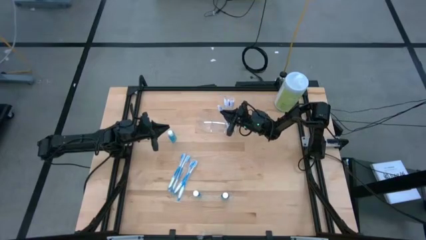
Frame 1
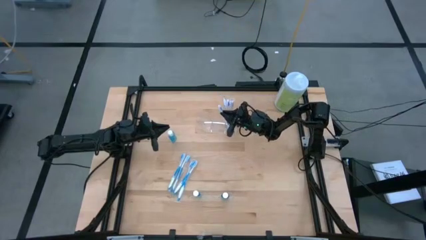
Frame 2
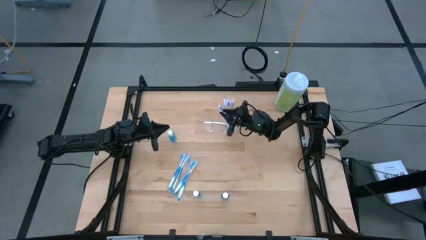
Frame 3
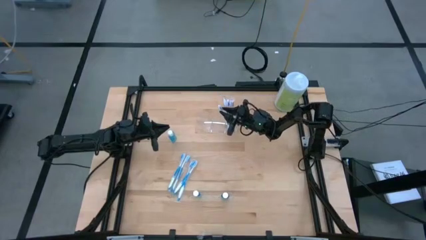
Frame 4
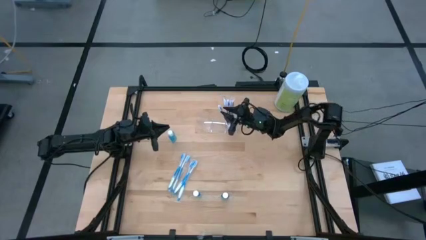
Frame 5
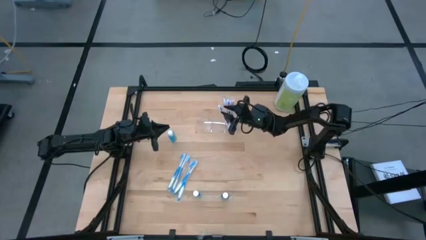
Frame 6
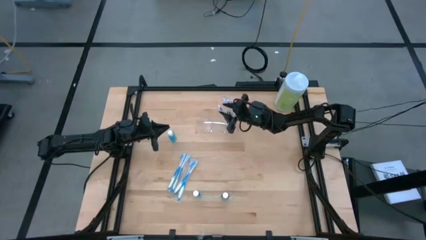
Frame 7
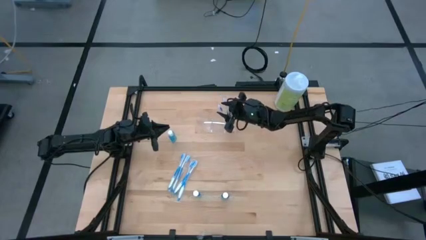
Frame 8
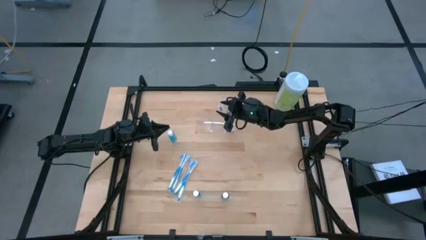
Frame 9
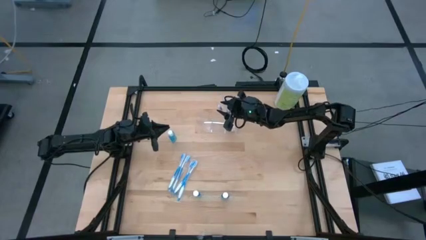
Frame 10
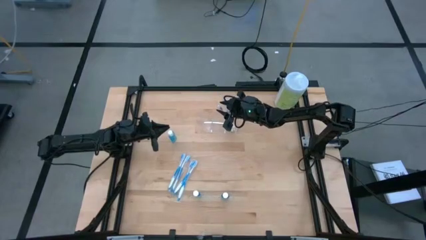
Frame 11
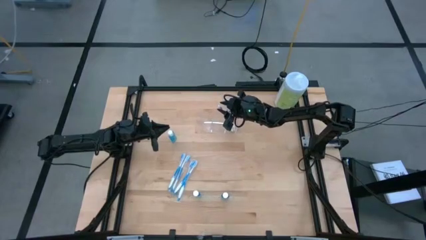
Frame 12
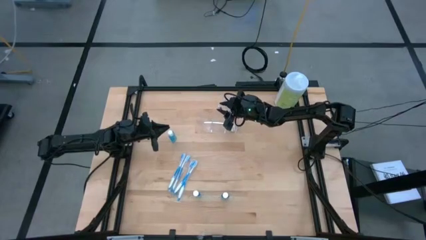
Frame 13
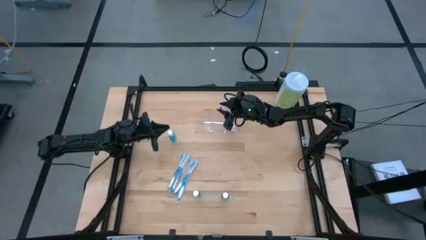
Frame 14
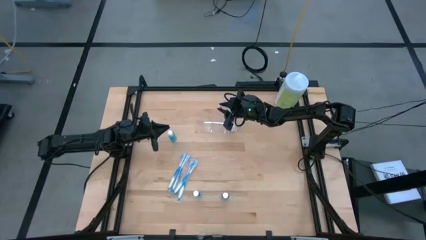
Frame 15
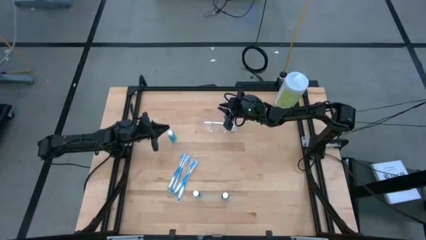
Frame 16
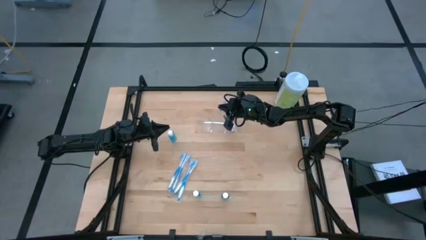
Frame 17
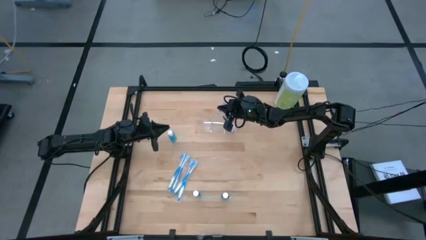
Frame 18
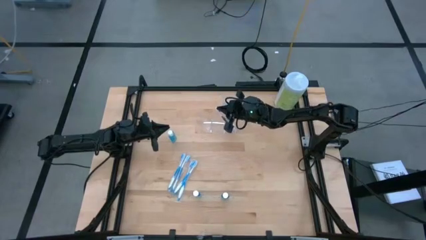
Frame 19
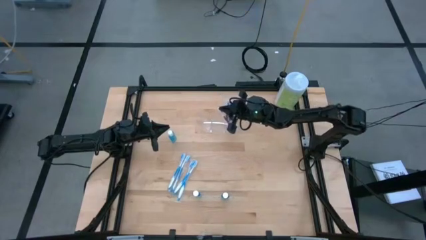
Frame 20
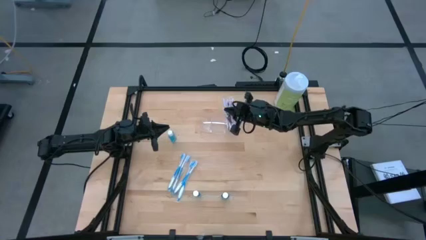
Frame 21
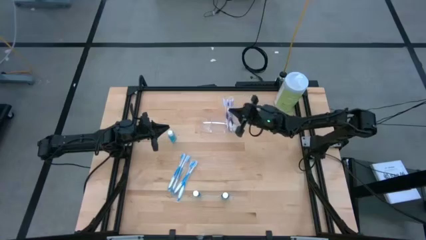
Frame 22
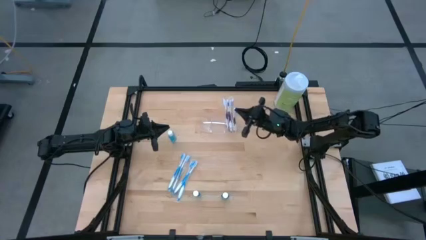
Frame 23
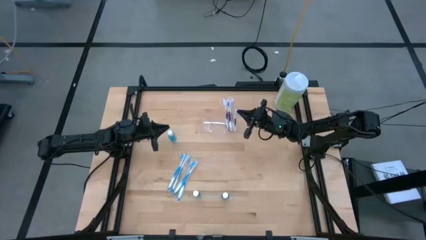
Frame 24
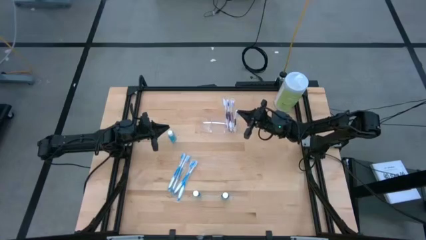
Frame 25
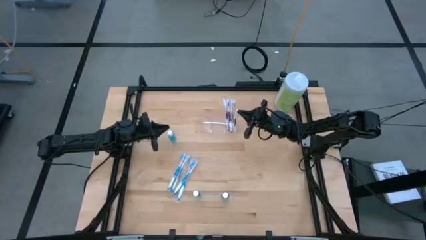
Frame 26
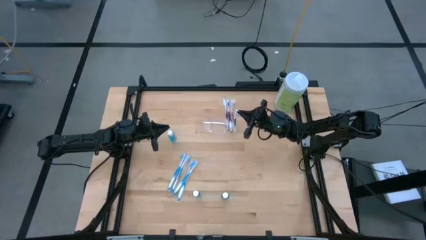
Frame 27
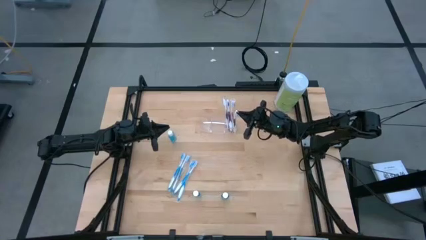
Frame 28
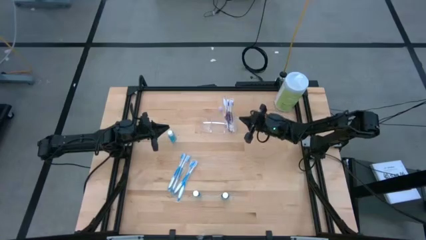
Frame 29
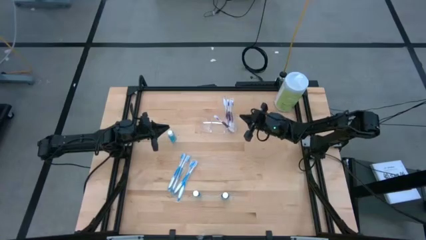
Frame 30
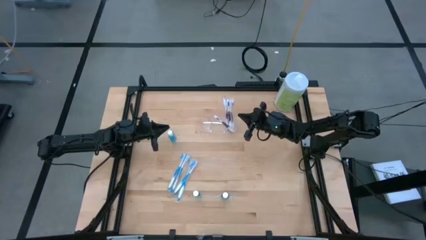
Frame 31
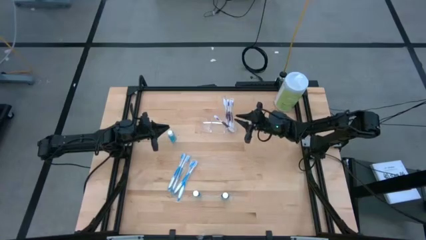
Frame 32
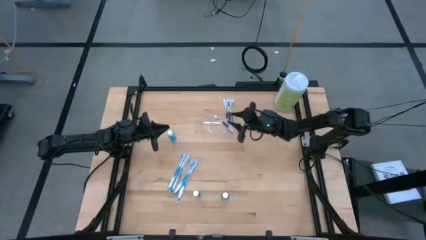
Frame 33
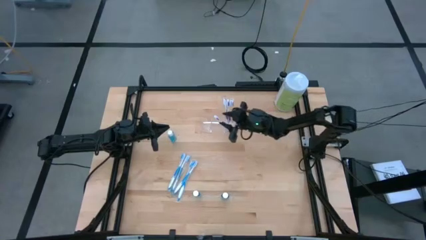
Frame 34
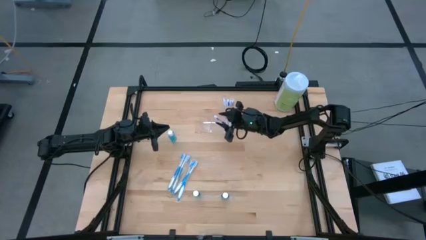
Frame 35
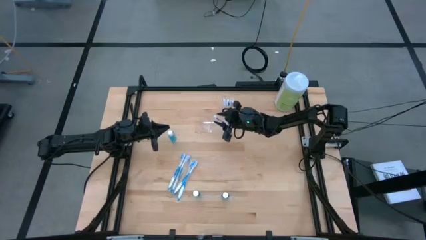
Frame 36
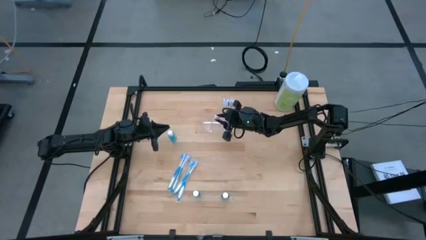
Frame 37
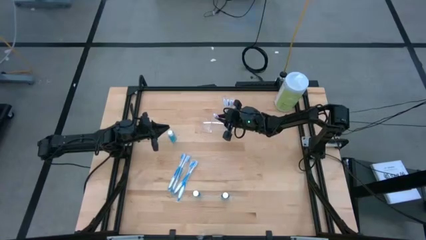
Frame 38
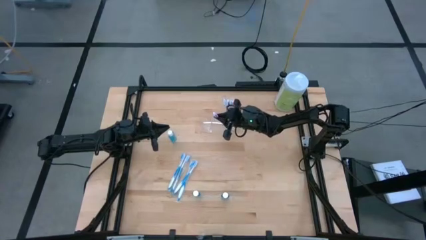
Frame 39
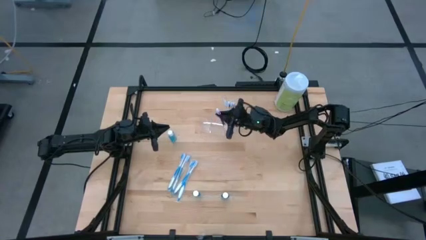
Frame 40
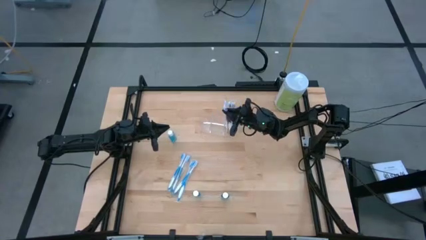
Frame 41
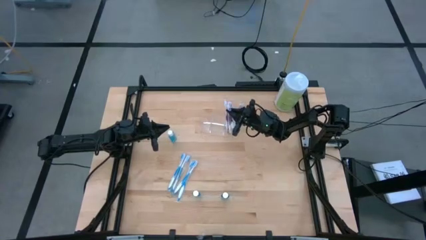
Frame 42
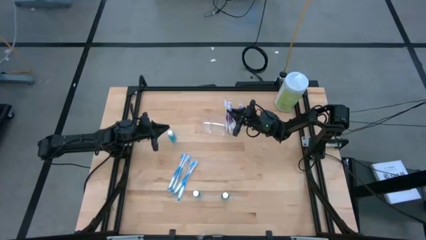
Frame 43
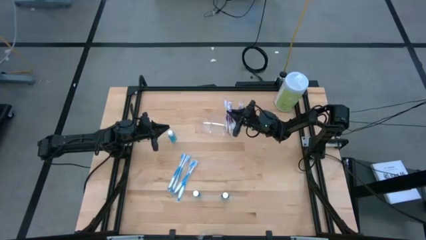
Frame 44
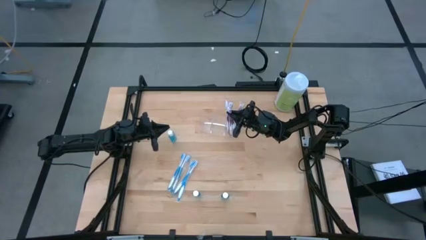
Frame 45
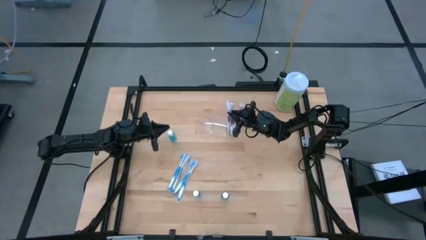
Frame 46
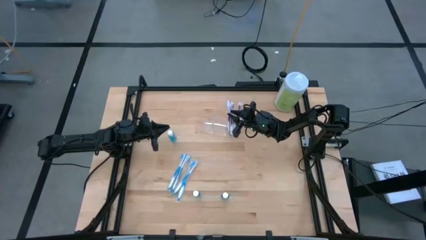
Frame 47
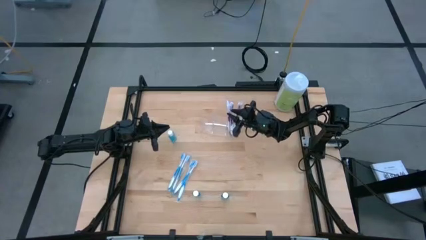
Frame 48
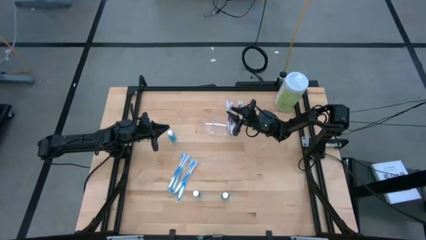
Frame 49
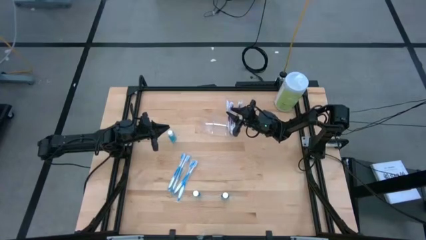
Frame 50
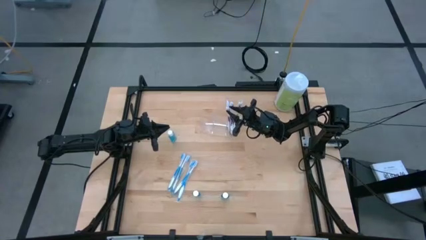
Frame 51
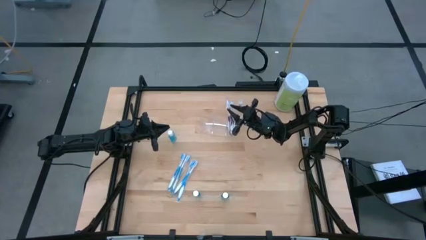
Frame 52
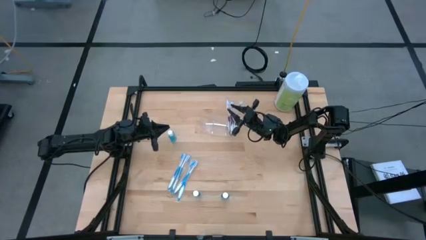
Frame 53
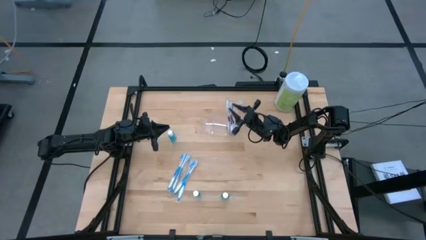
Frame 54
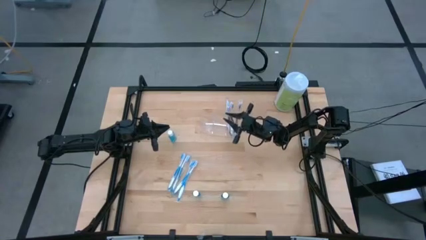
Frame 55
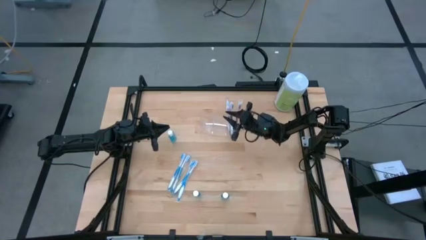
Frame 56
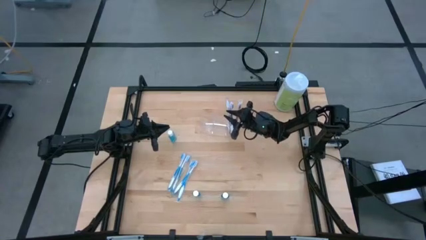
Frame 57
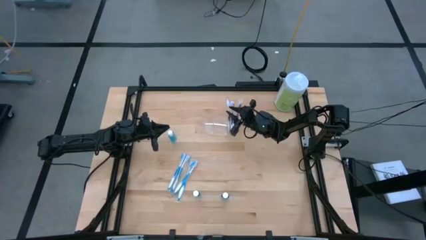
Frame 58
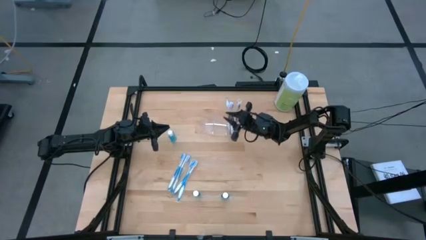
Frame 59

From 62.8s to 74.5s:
Task: Pick & Place toothbrushing station
Put the violet toothbrush into the transparent organizer

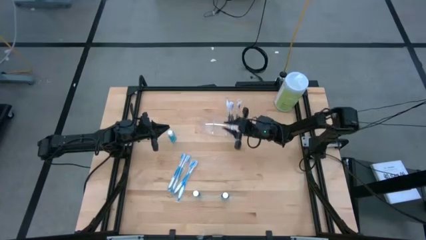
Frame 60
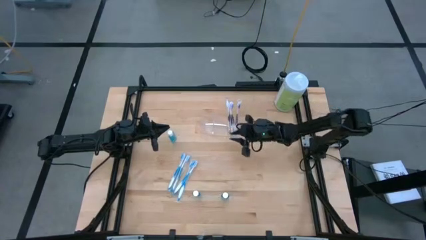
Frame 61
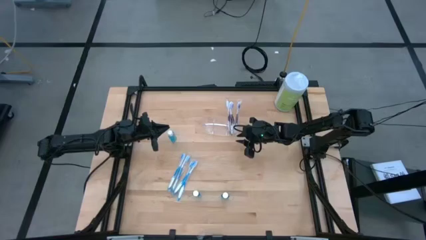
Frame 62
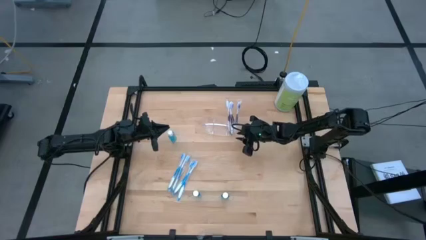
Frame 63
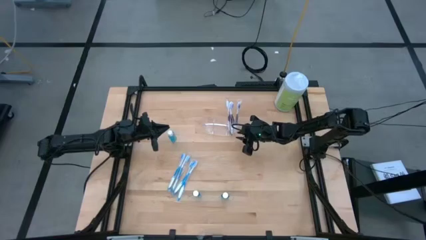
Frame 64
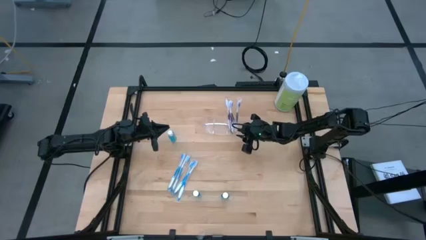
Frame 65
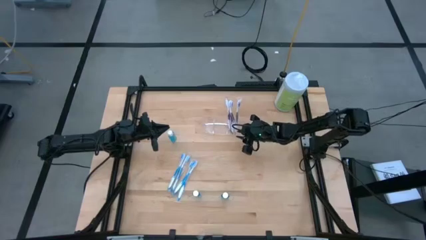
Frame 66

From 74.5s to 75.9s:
Adjust the transparent organizer

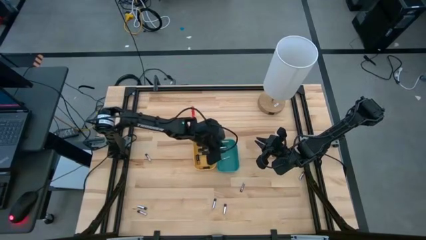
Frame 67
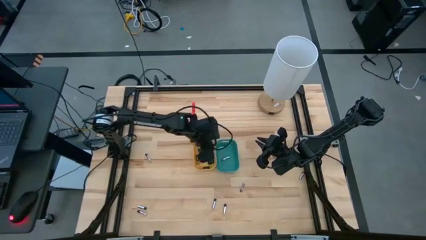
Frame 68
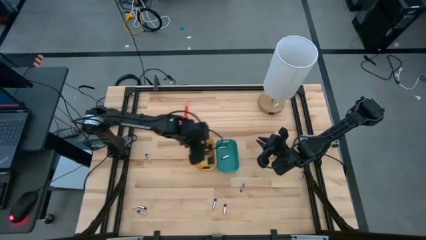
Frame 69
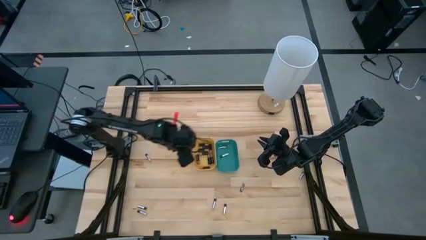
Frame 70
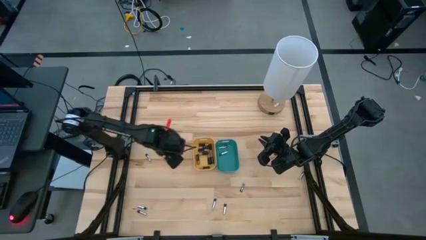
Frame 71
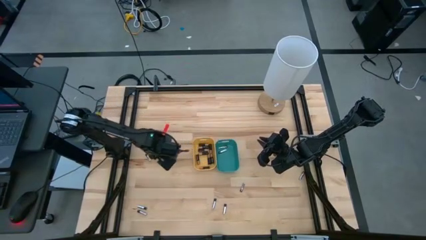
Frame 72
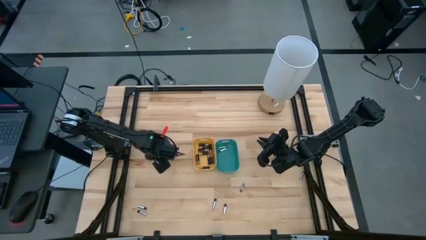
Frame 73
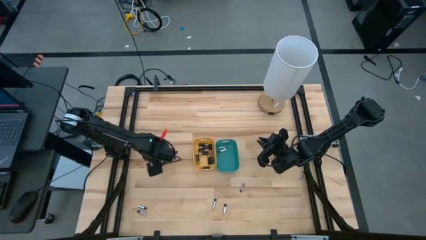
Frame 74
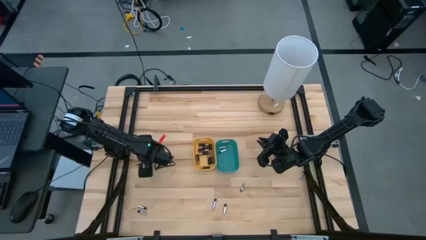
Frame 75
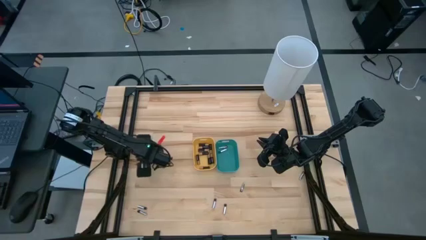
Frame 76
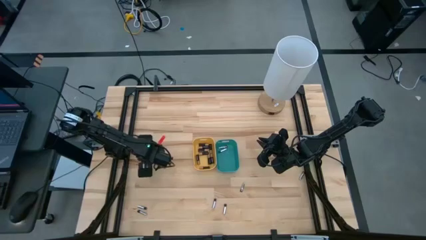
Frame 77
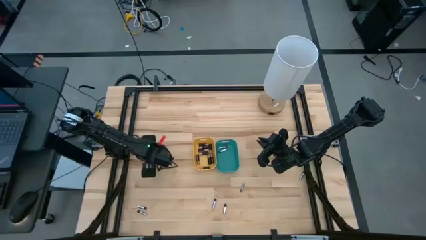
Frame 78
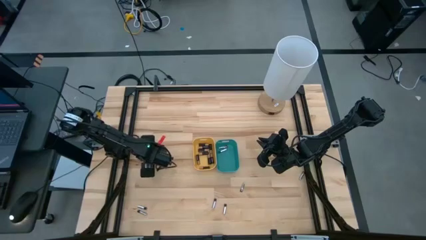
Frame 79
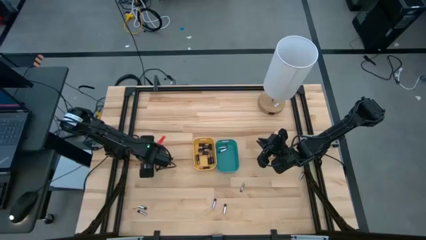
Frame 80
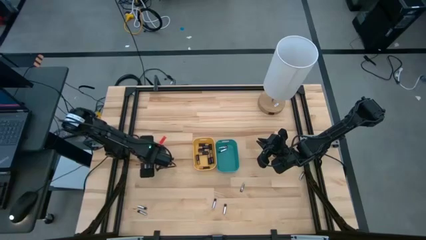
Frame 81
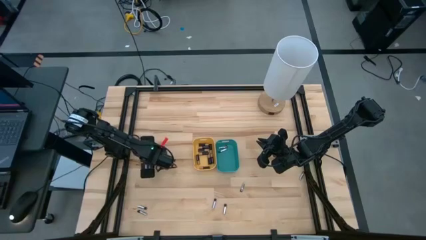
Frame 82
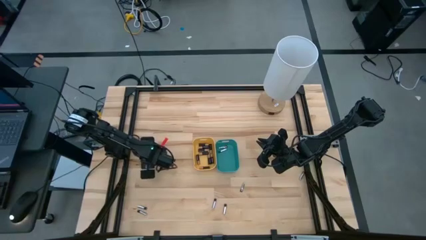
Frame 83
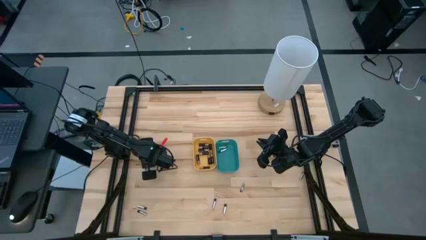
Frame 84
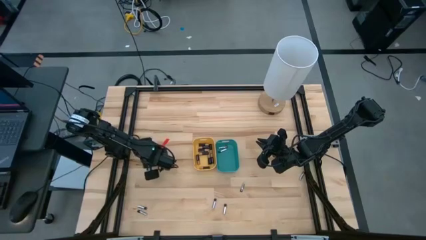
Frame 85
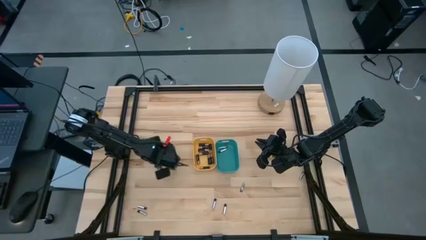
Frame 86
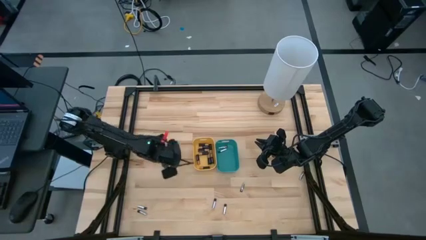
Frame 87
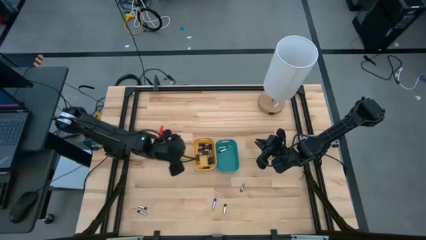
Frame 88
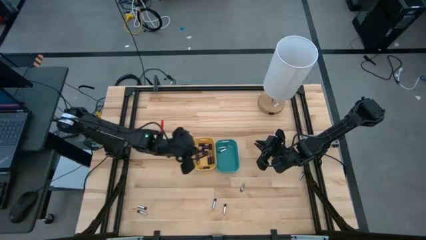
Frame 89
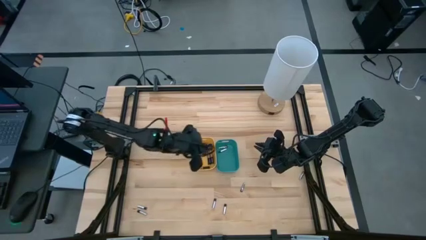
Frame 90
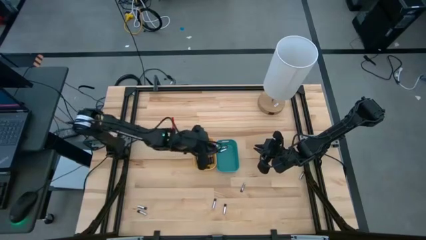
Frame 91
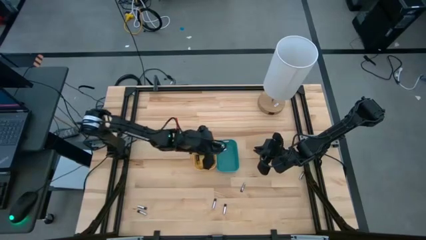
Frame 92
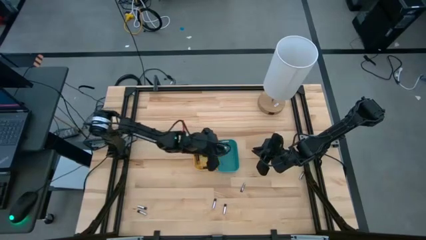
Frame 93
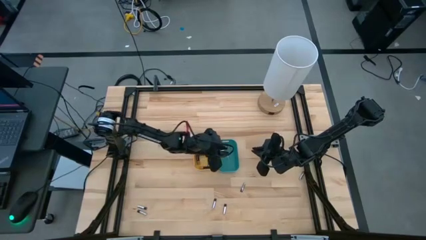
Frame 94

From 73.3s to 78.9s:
Task: Sort batteries
Put the silver battery into the green bin
